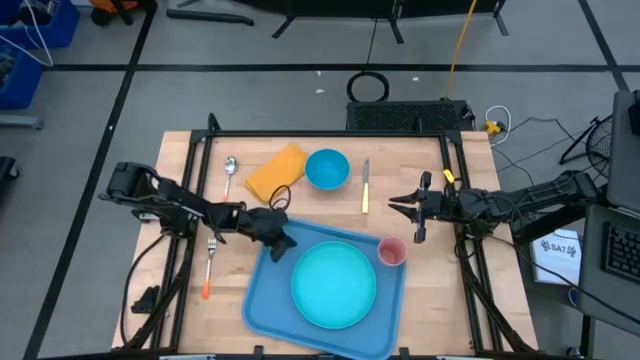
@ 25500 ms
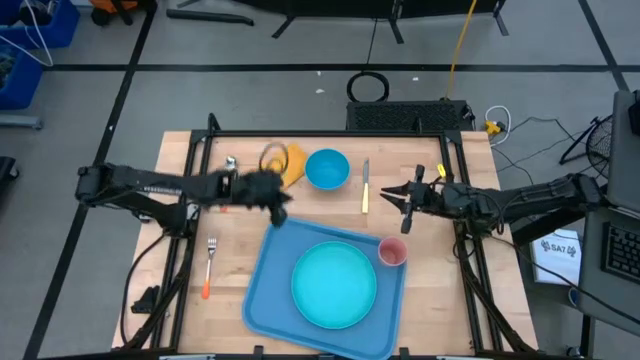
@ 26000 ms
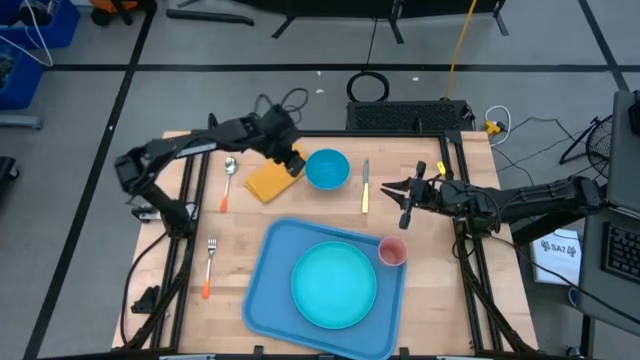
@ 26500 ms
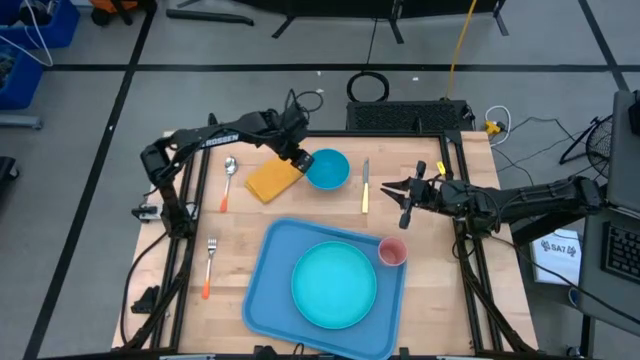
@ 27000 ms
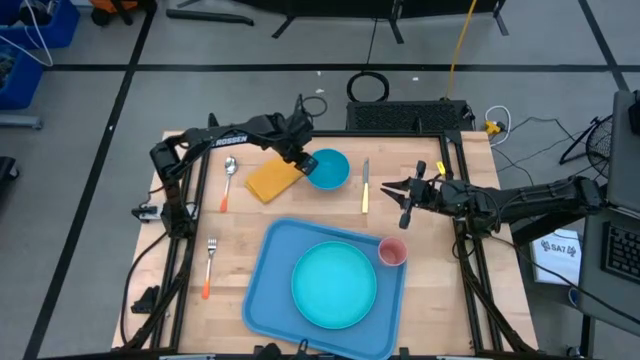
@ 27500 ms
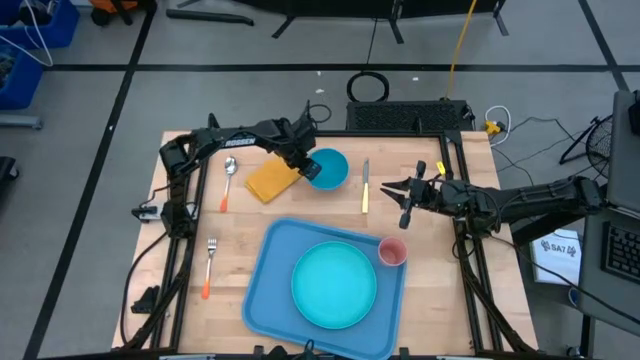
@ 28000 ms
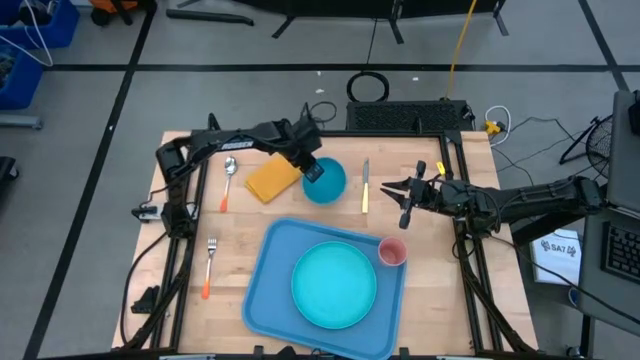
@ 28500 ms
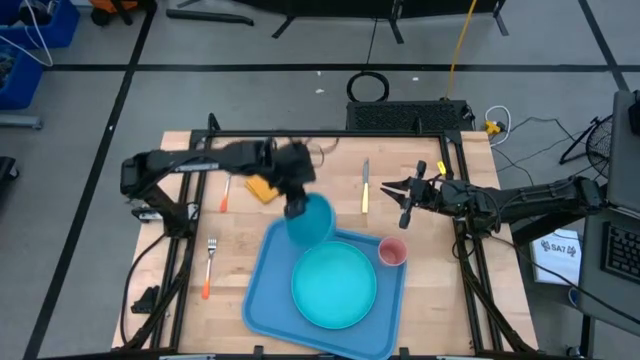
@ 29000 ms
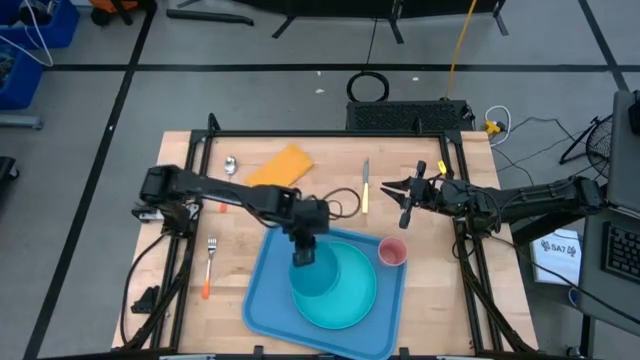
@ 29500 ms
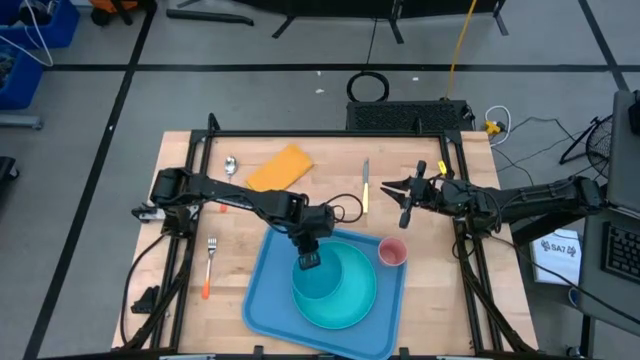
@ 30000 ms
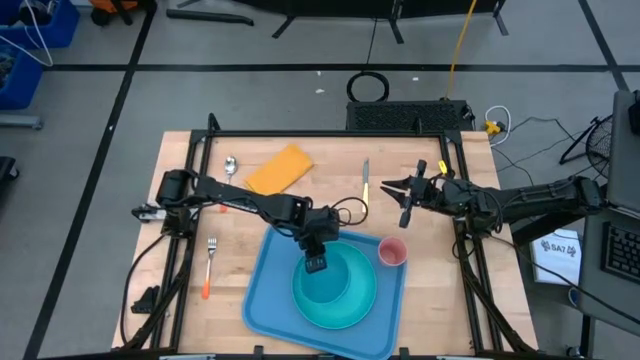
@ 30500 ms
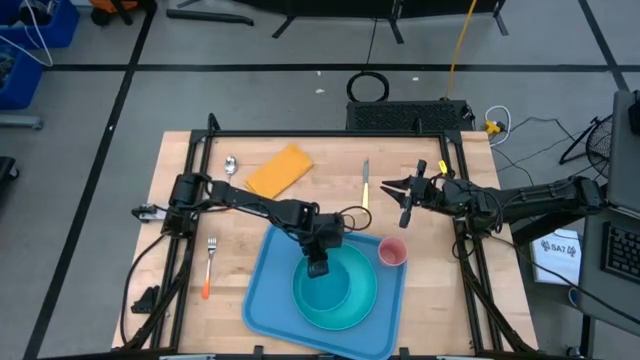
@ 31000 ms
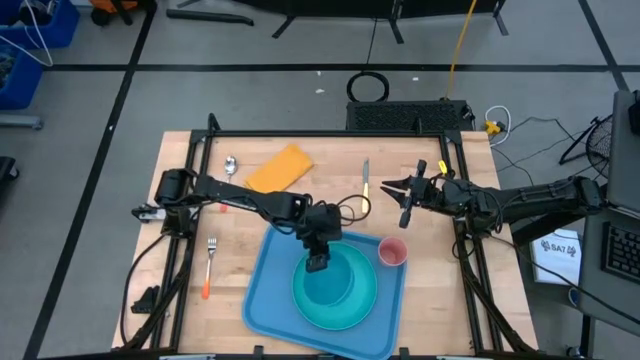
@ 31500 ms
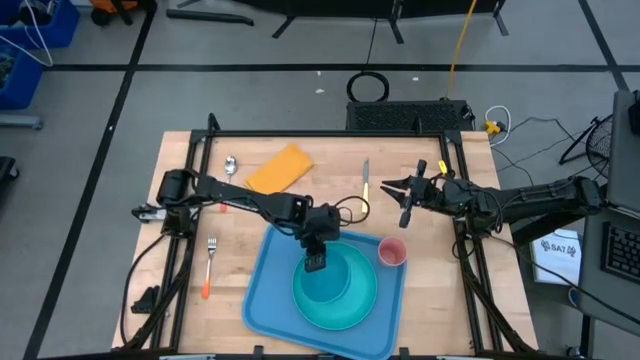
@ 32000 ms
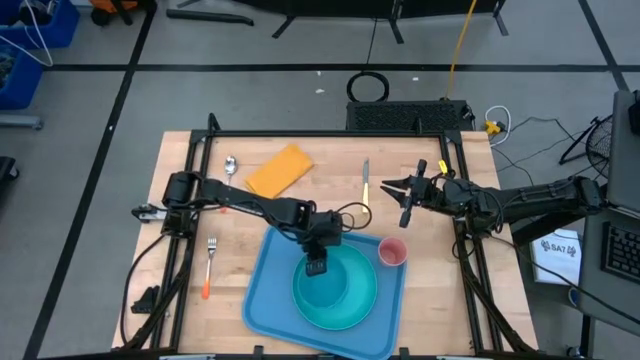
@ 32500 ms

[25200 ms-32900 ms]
Task: Set up tray
Put the blue bowl on the light blue plate

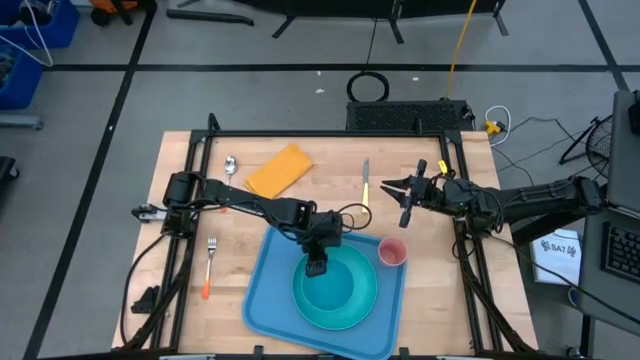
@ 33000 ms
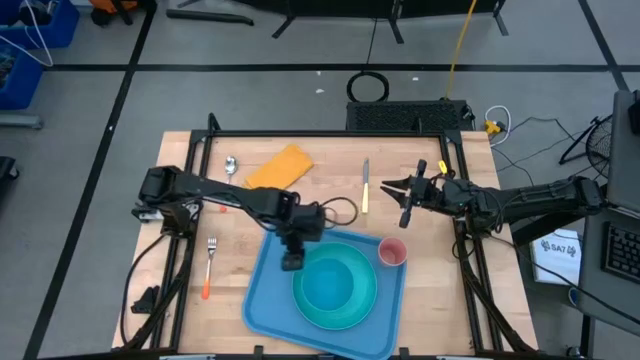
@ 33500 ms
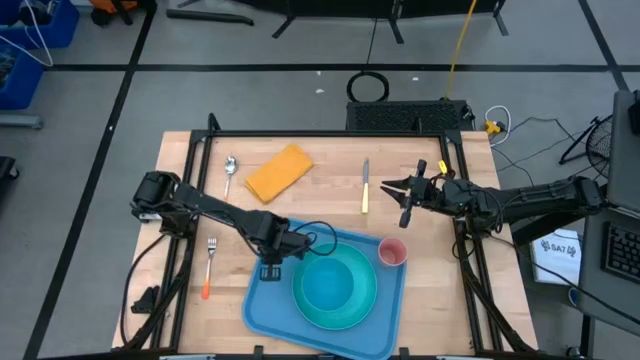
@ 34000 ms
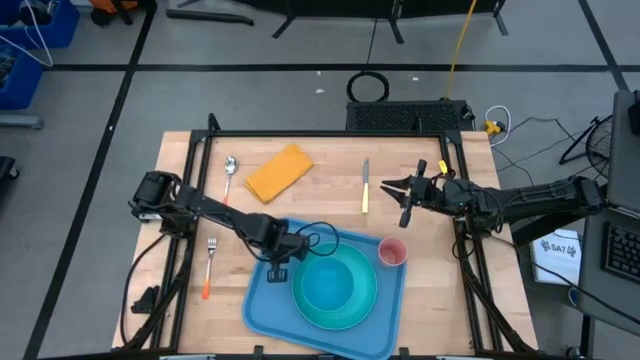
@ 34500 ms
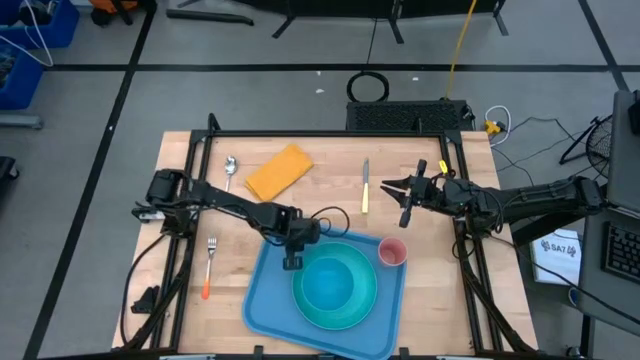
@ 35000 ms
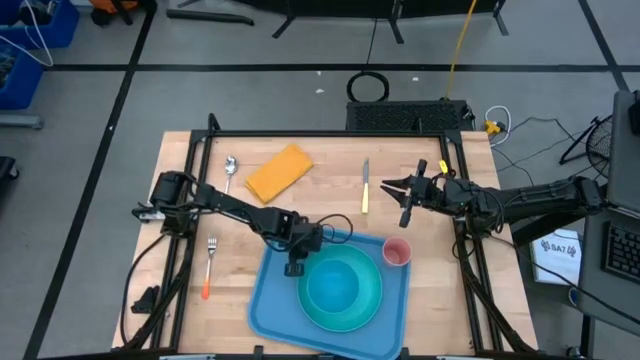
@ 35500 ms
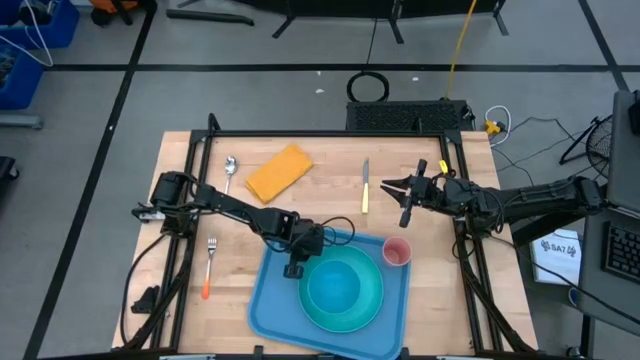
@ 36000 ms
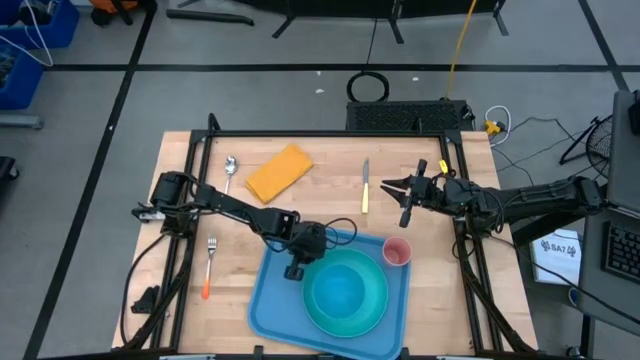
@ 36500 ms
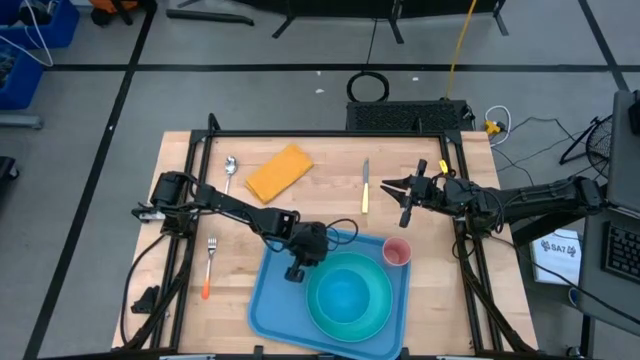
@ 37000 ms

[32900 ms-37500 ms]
Adjust the blue plate on the blue tray

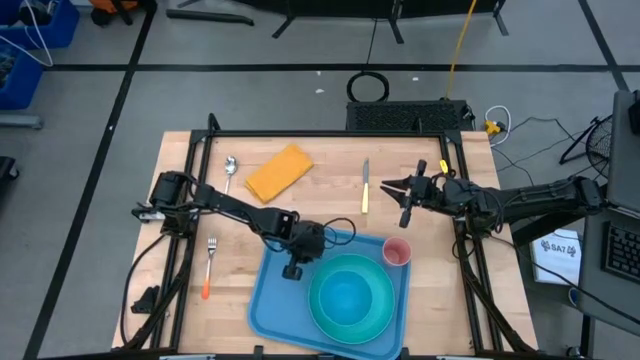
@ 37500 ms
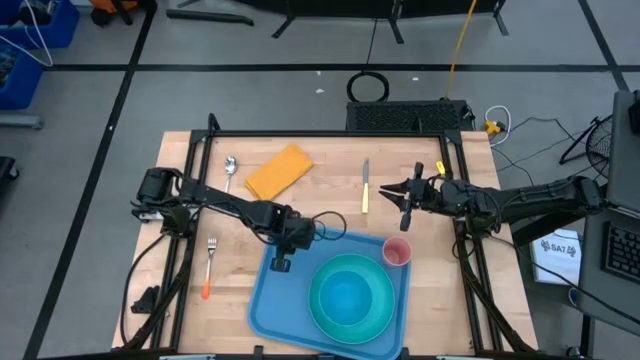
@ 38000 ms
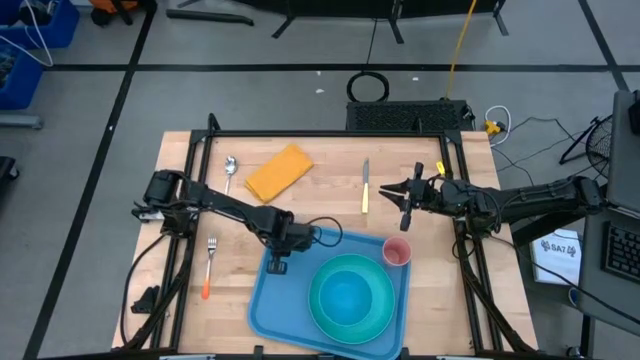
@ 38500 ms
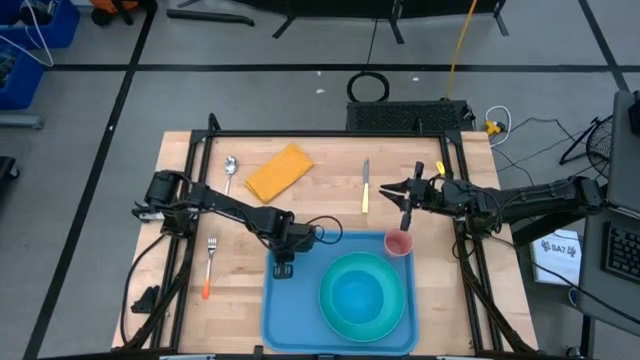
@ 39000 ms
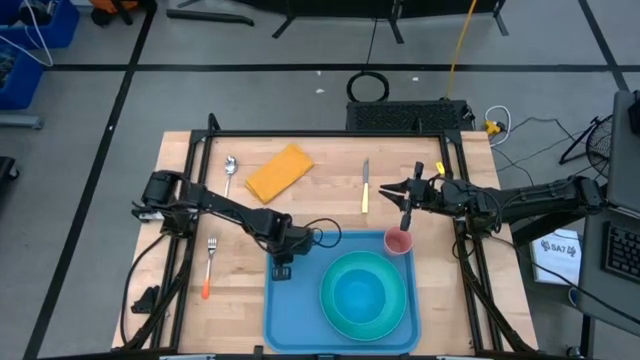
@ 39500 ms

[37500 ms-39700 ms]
Adjust the blue tray

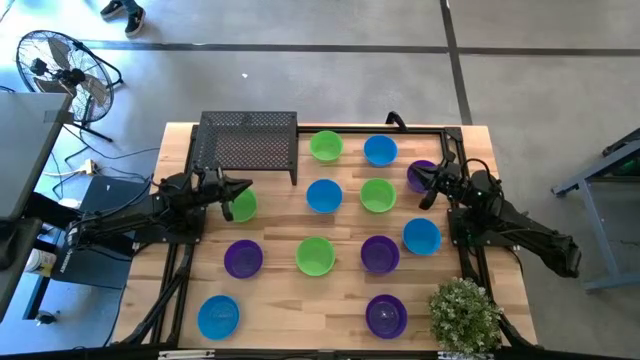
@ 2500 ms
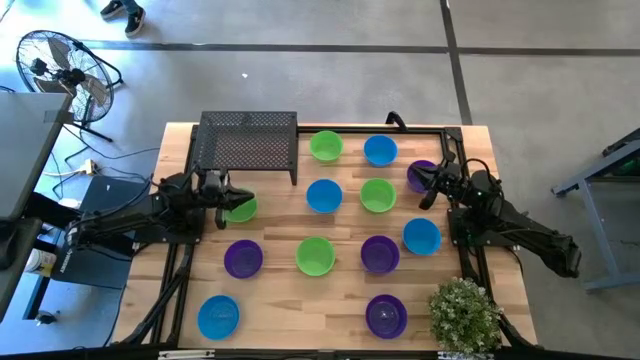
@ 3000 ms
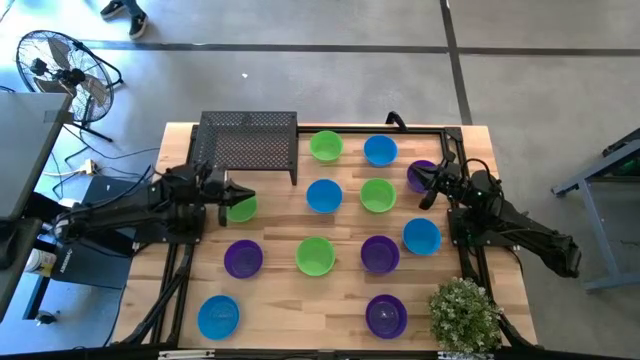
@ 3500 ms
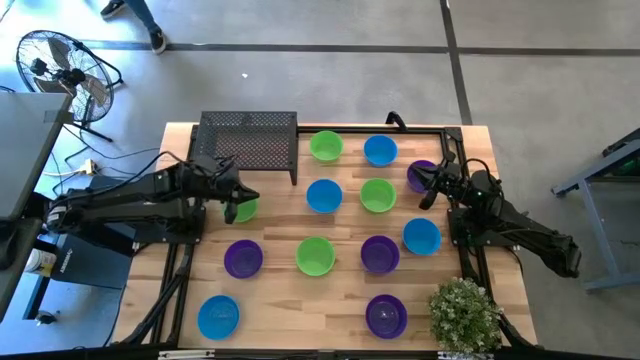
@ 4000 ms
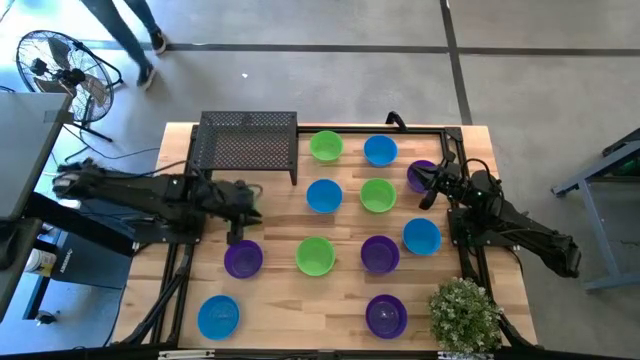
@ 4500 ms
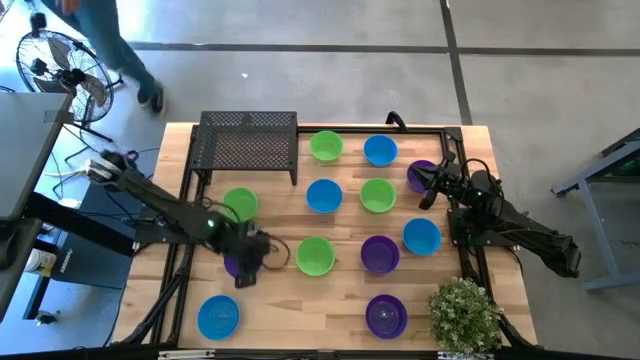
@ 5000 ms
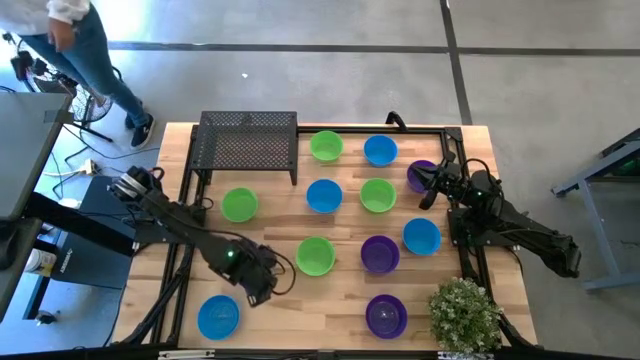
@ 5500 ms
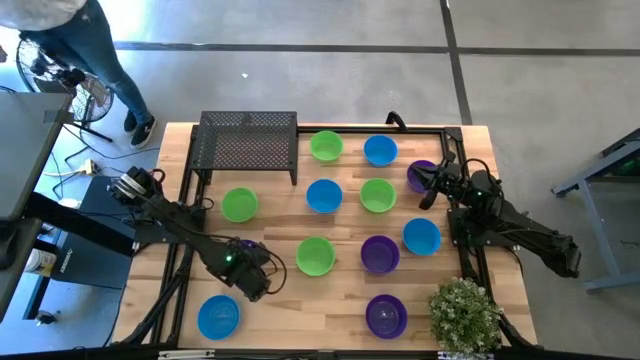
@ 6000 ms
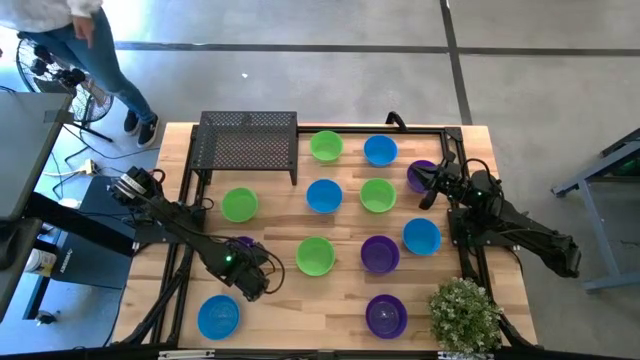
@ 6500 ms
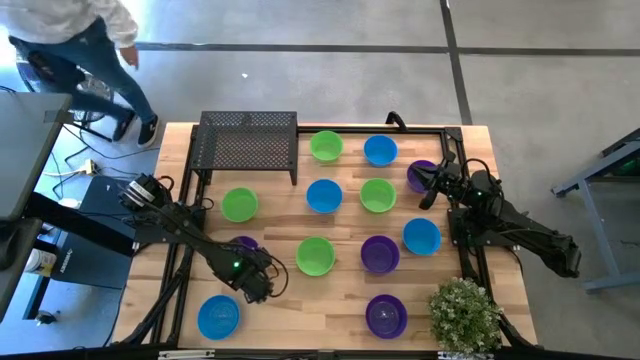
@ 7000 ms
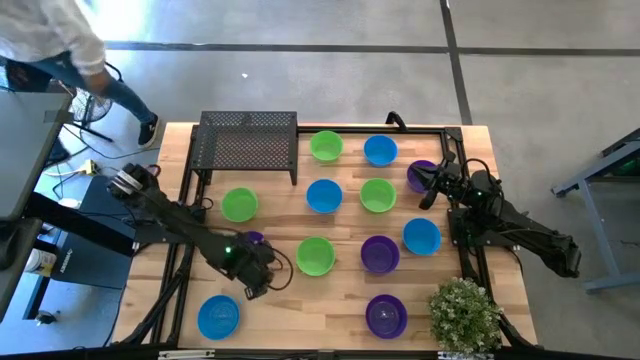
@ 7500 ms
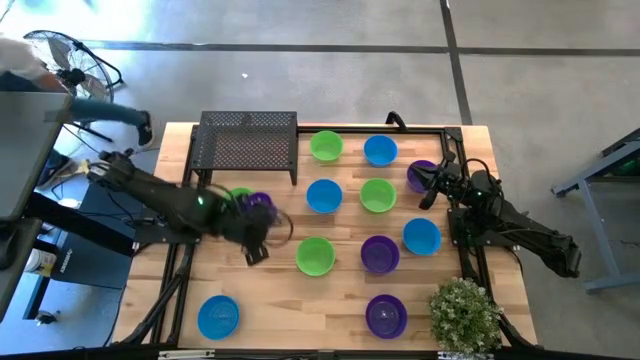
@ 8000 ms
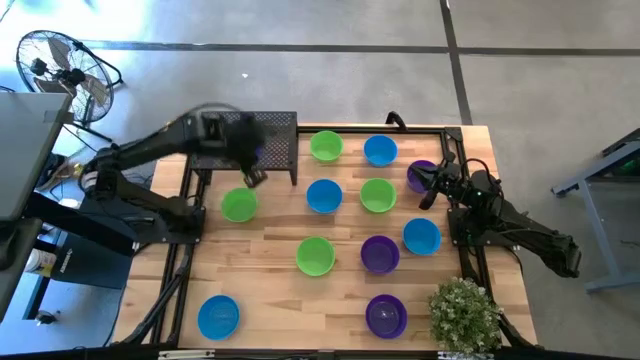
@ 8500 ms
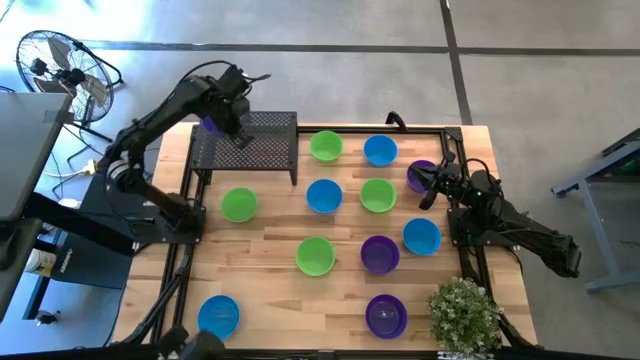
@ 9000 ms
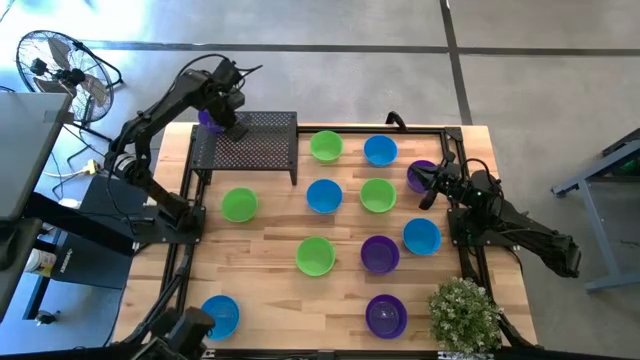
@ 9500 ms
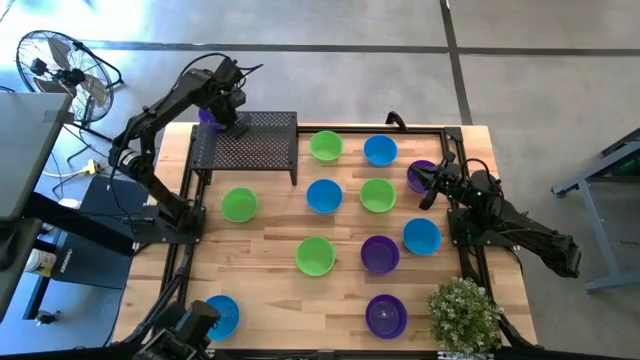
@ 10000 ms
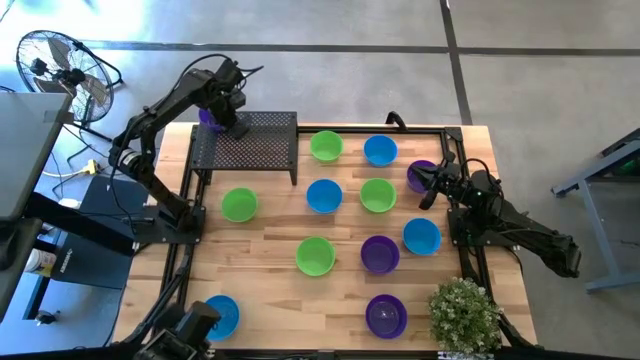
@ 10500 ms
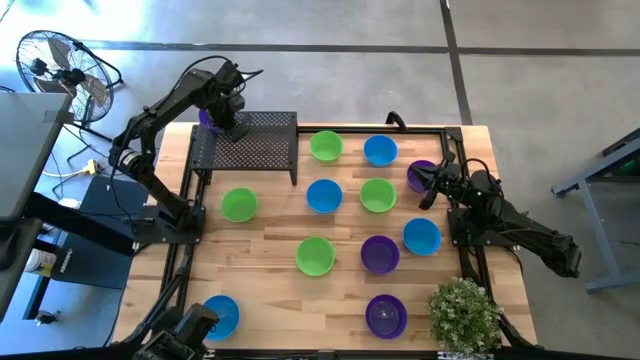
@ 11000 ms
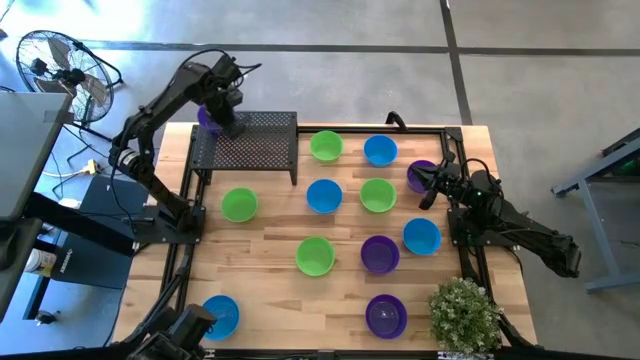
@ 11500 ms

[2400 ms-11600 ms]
Task: Pick & Place Mini bowls
Put the purple bowl on the shelf
